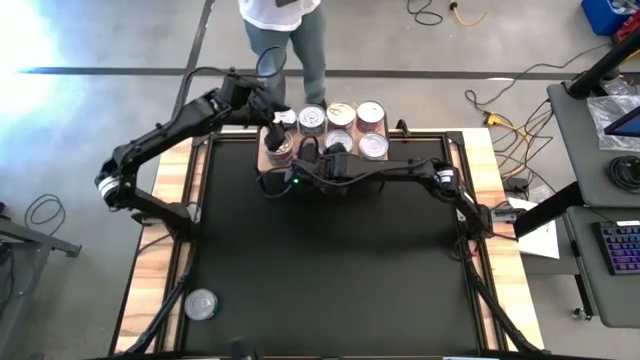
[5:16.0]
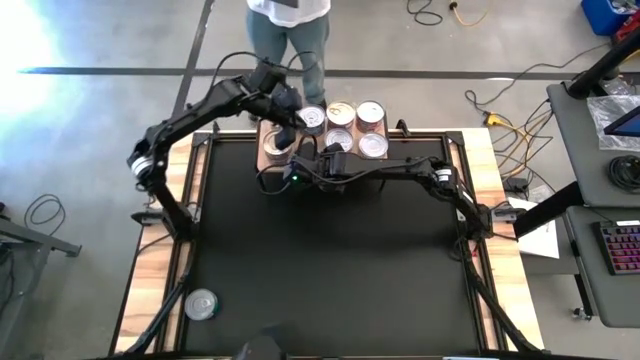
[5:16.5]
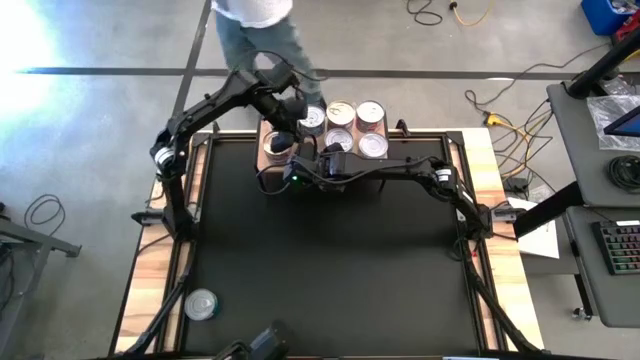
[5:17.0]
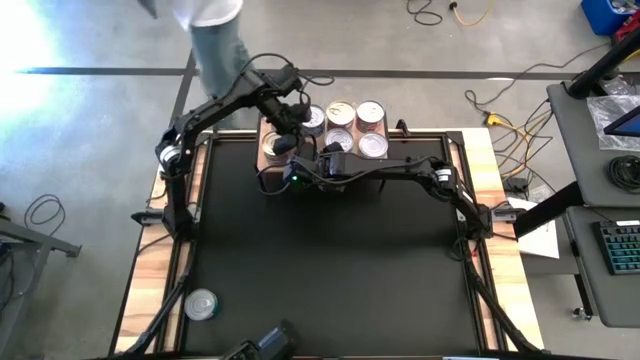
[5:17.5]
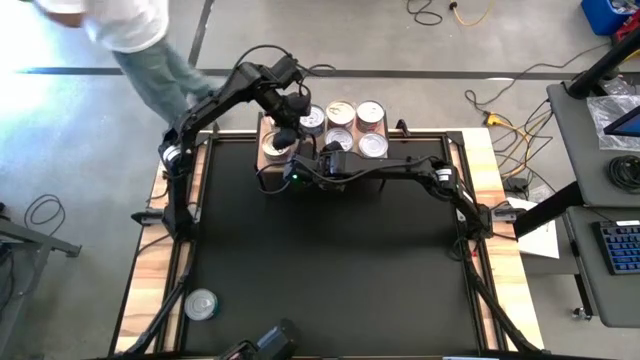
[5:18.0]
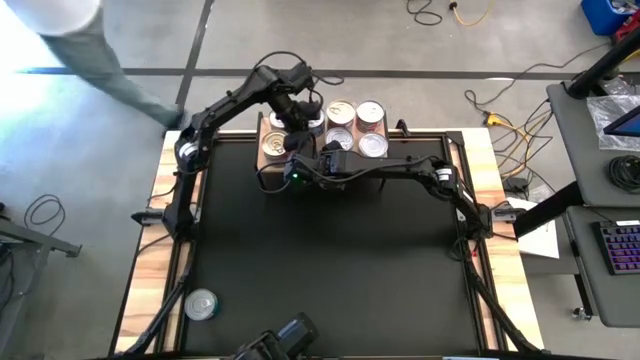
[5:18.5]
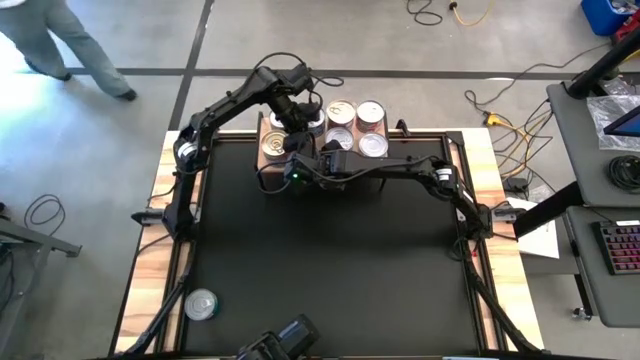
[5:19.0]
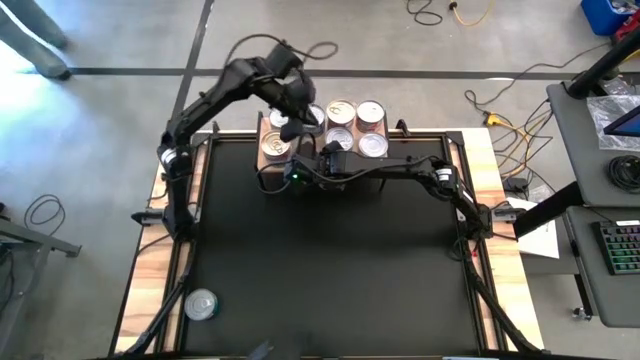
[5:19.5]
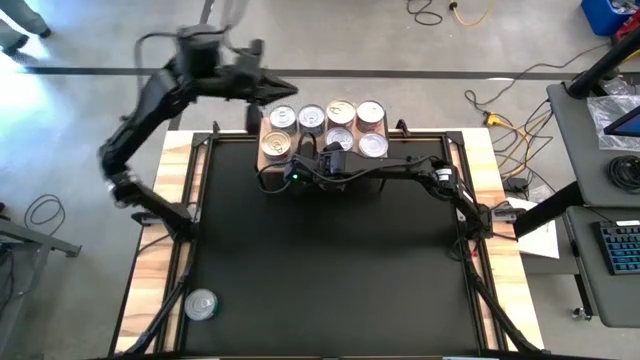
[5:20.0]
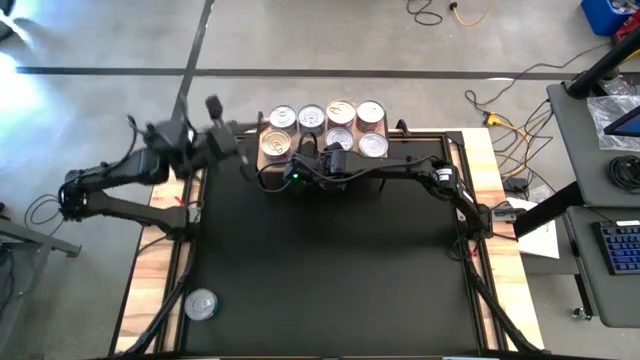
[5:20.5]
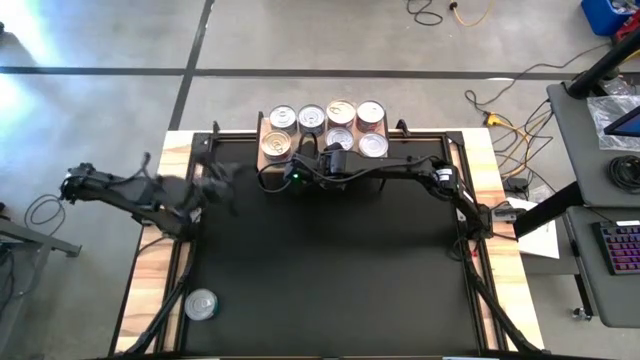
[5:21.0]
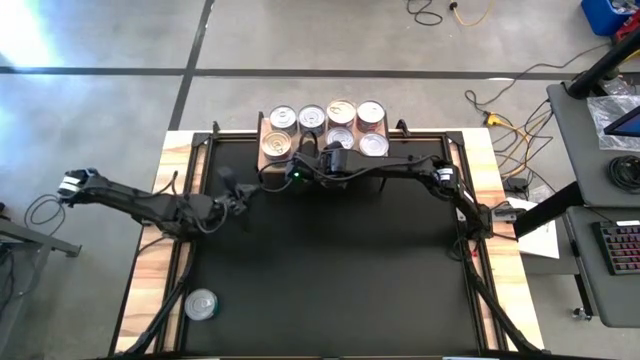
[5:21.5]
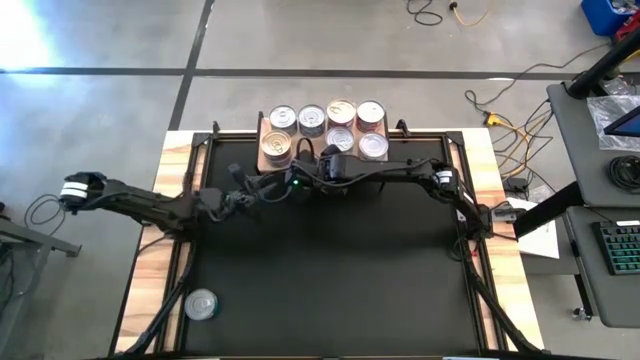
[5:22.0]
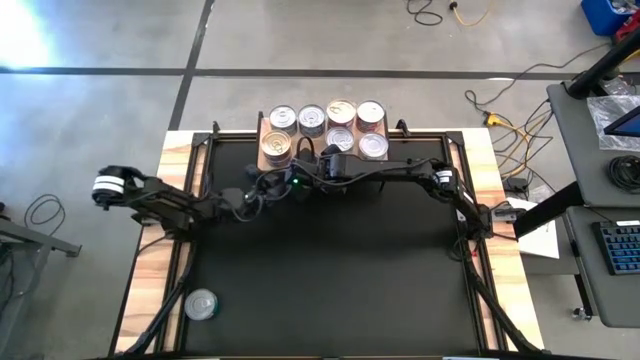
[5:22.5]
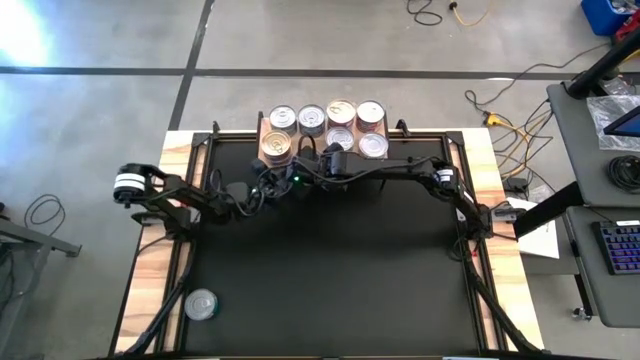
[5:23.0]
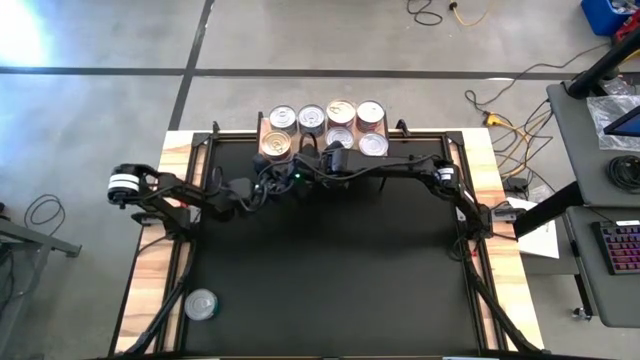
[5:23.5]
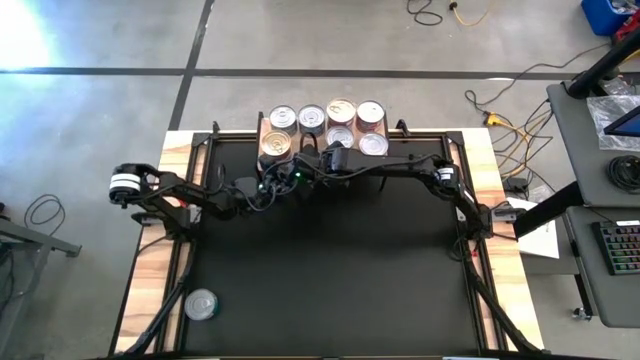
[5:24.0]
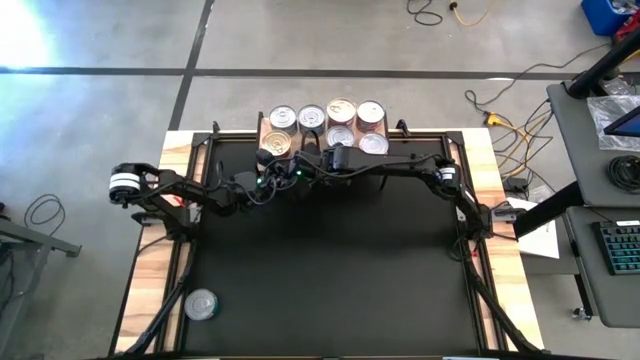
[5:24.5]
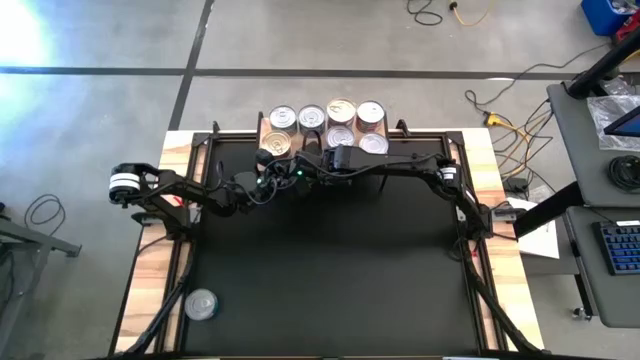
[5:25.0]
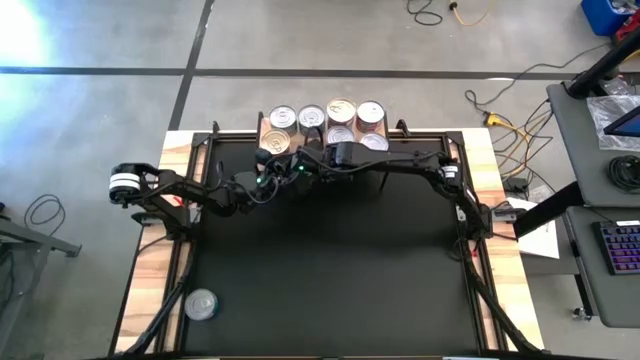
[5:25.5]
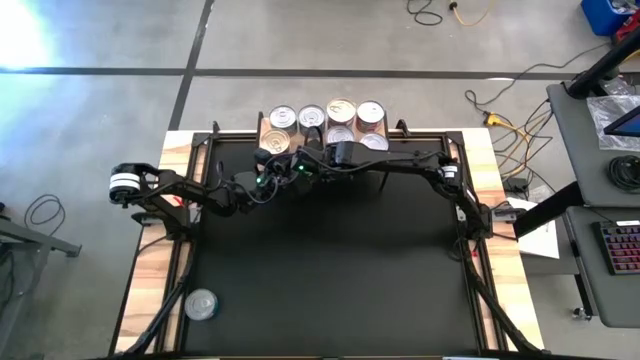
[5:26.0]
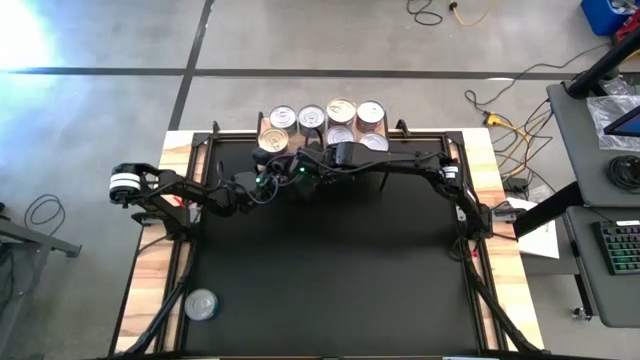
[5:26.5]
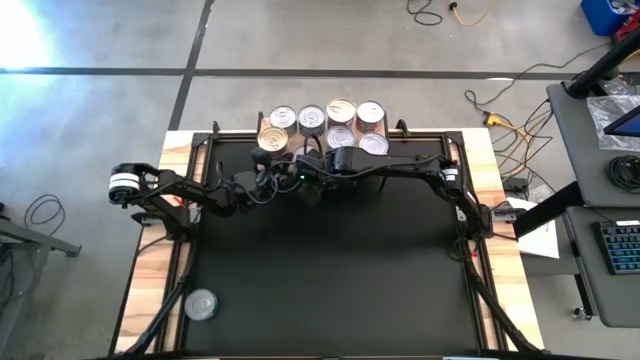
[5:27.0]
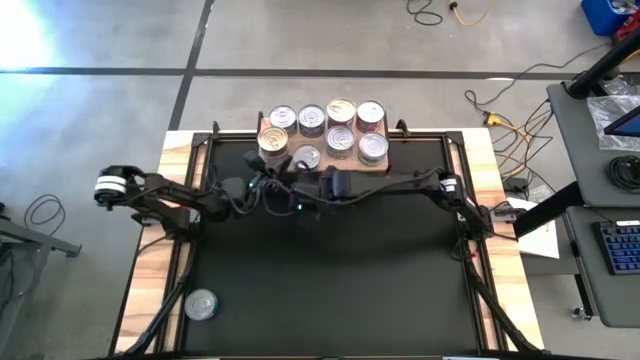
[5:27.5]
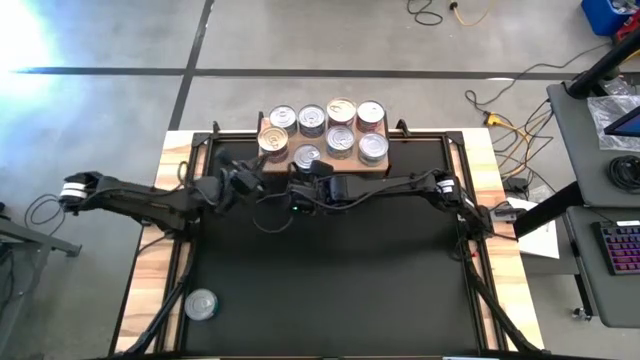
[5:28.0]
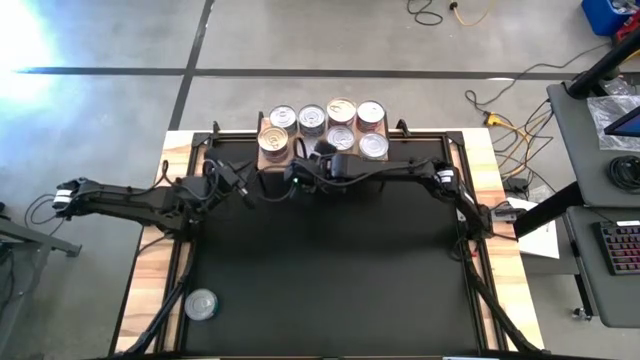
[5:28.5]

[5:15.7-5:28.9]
Task: Stack canned seafood by type on shelf
Put the green-blue tuna can on the shelf

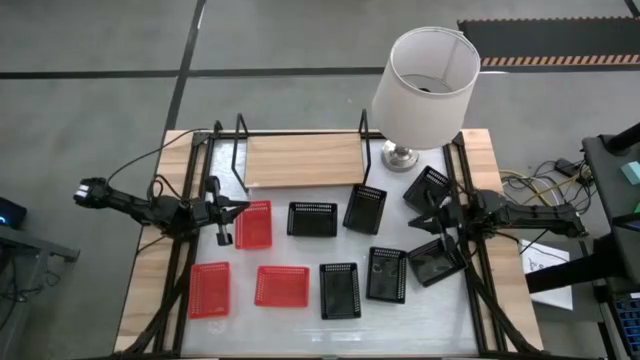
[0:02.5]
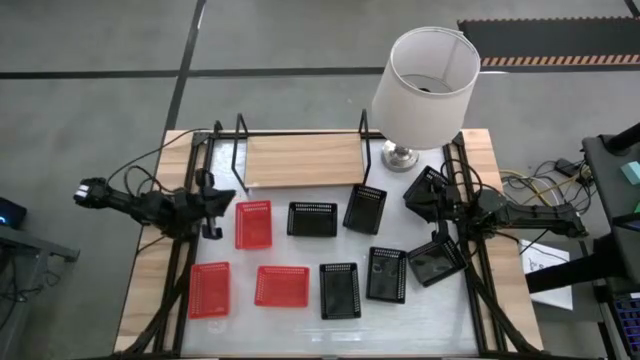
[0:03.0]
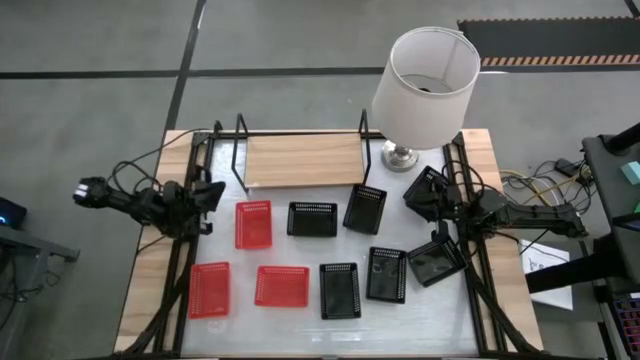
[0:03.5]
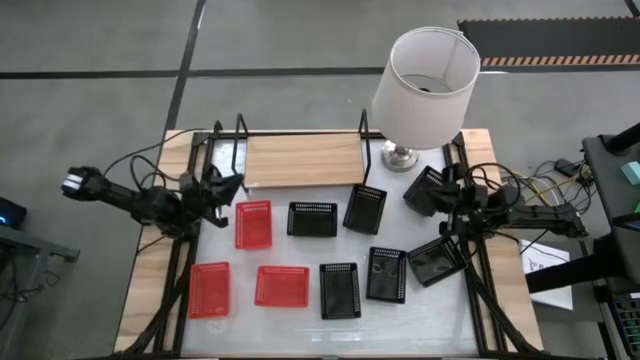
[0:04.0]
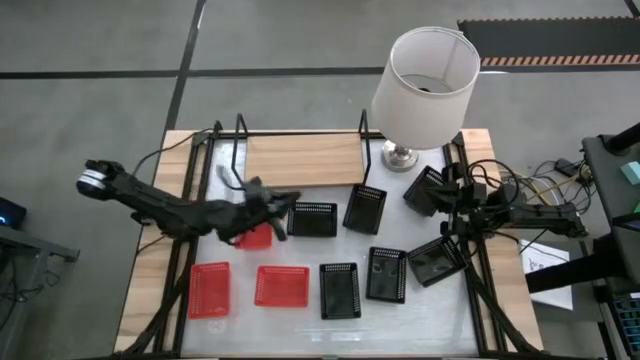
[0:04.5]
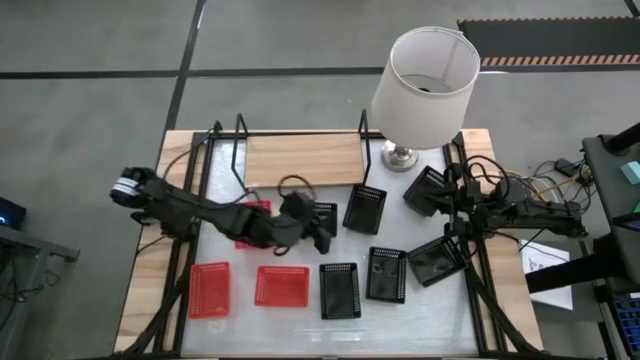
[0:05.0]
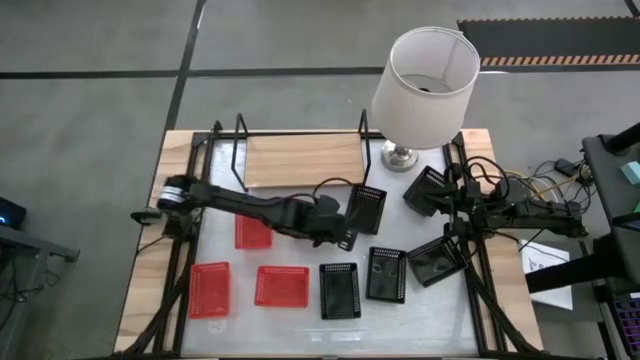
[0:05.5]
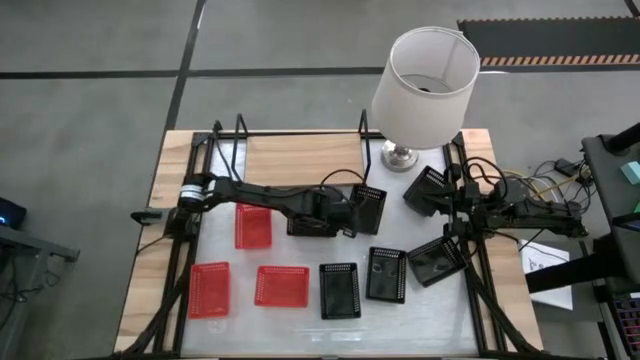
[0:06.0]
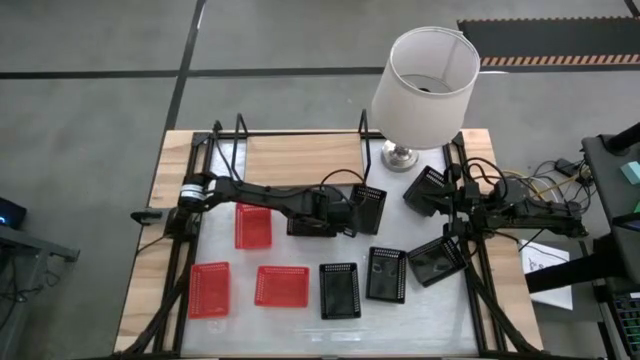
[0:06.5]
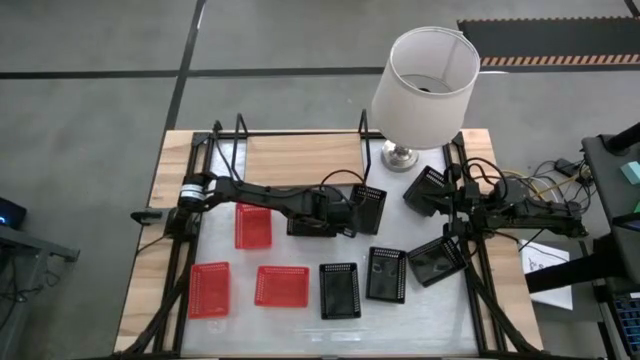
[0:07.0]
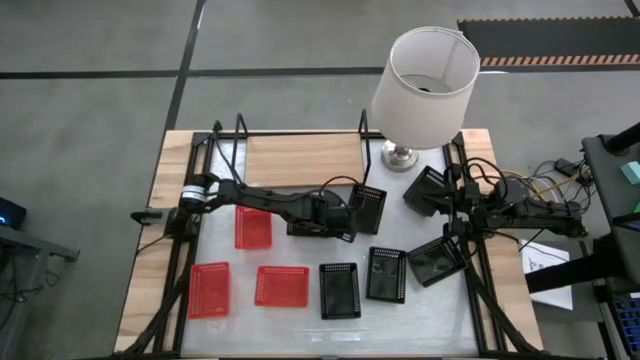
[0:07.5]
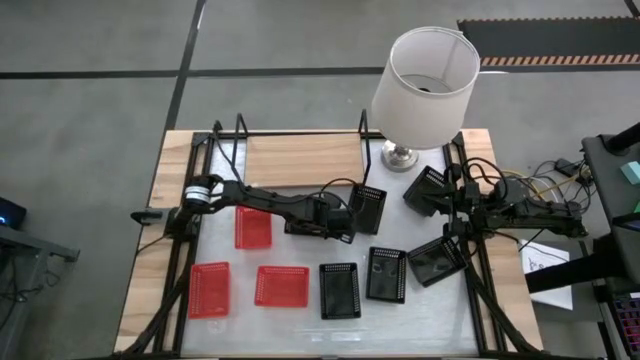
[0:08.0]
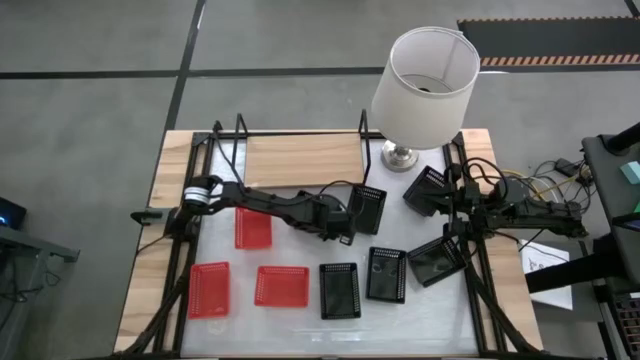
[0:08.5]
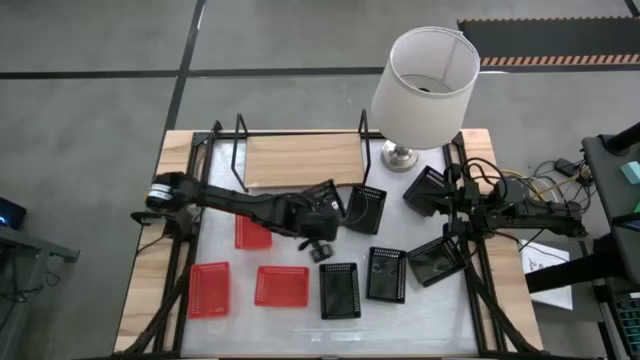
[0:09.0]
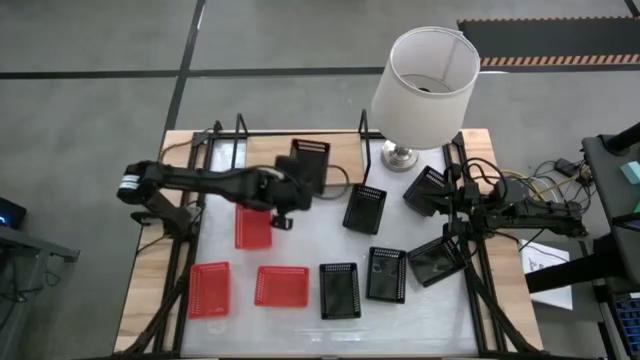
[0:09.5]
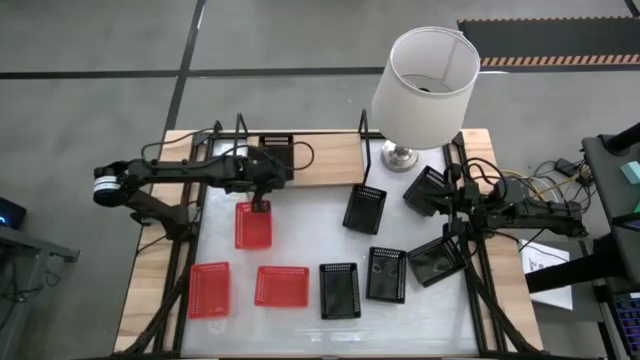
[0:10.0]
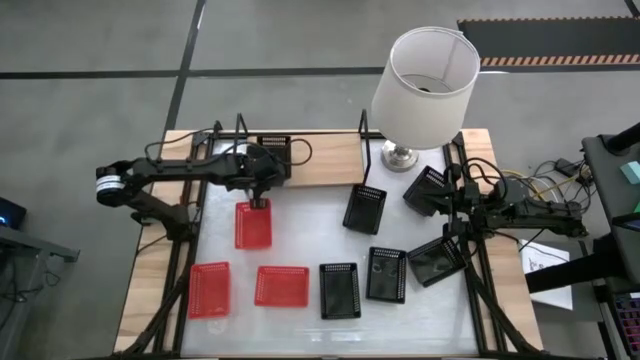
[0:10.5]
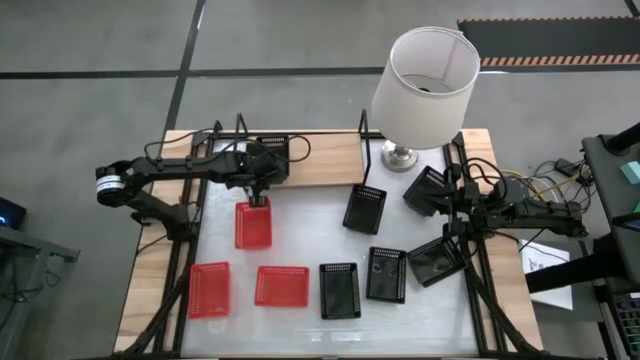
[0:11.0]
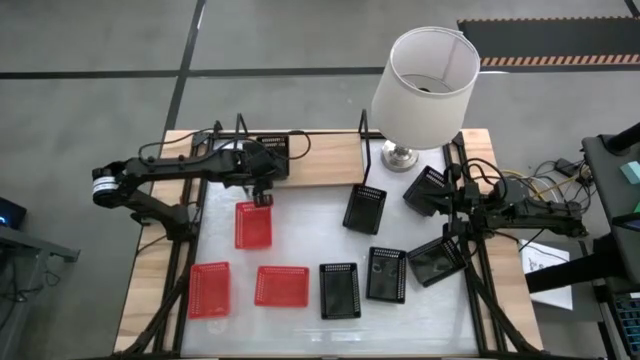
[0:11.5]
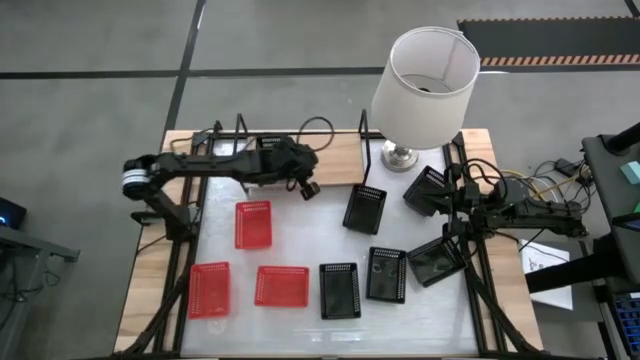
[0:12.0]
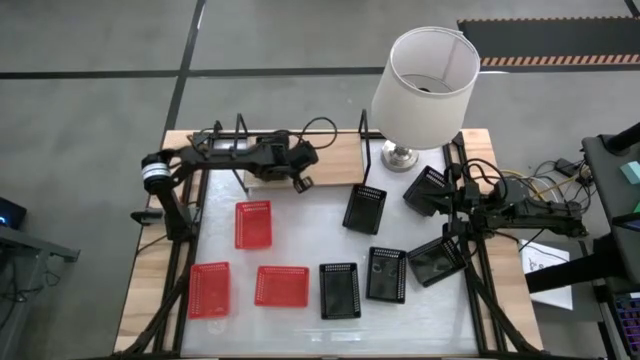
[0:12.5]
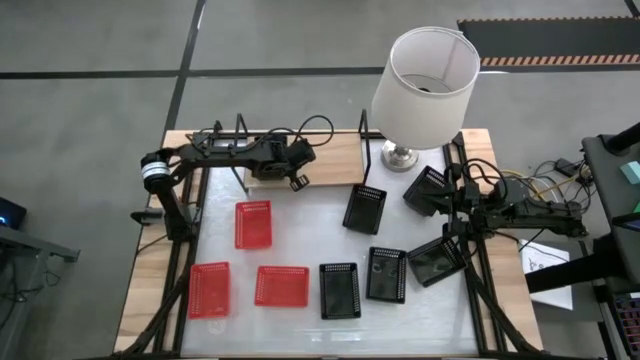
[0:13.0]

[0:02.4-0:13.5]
Task: Stack baskets on shelf by color
Put the black bin on the shelf
